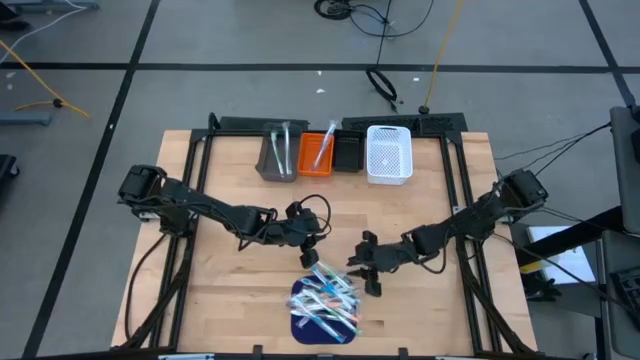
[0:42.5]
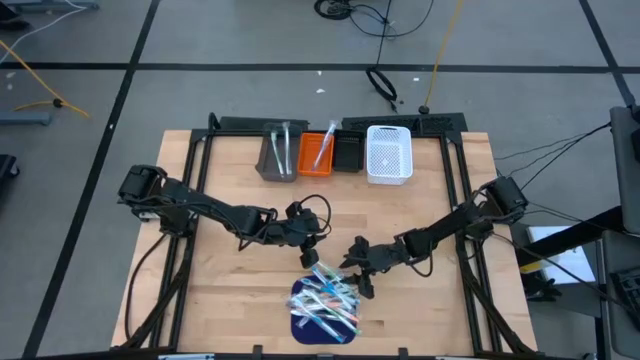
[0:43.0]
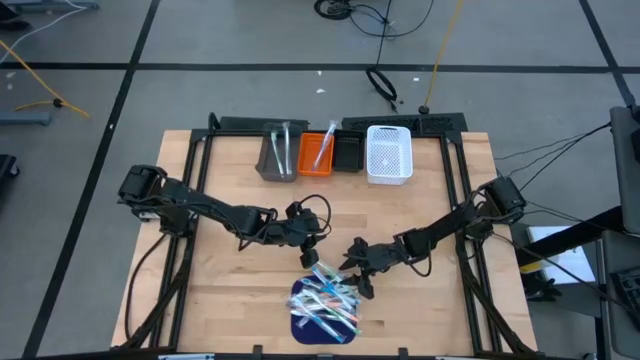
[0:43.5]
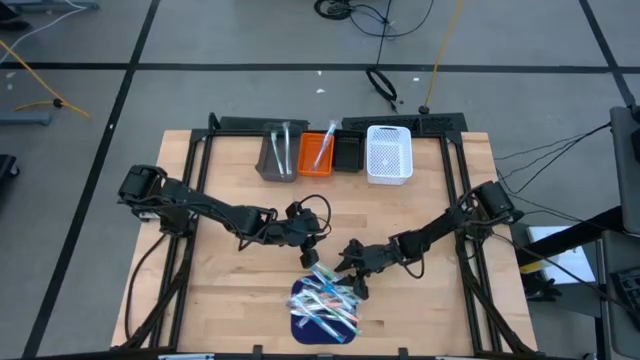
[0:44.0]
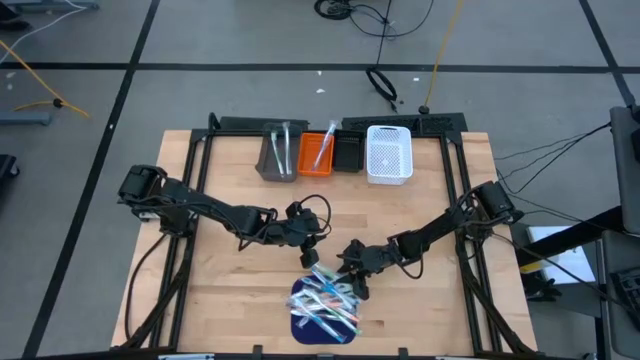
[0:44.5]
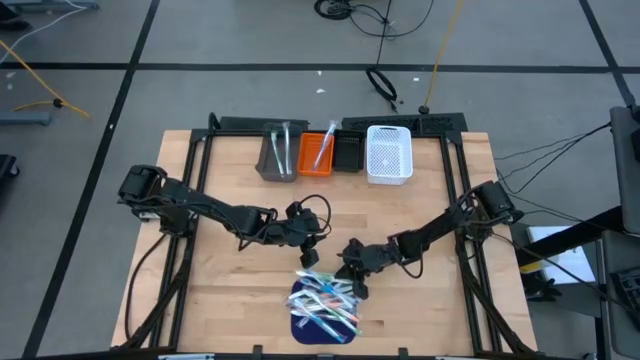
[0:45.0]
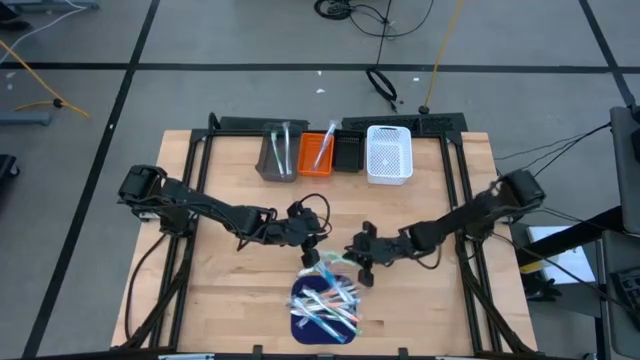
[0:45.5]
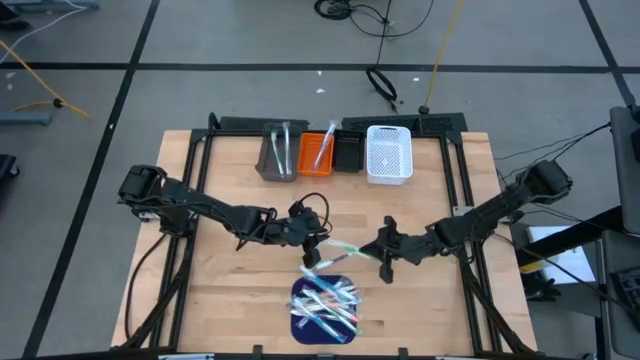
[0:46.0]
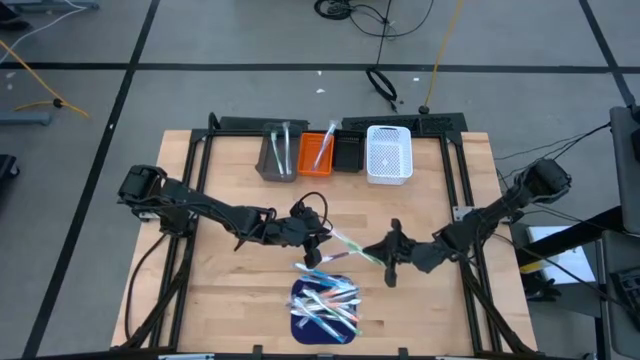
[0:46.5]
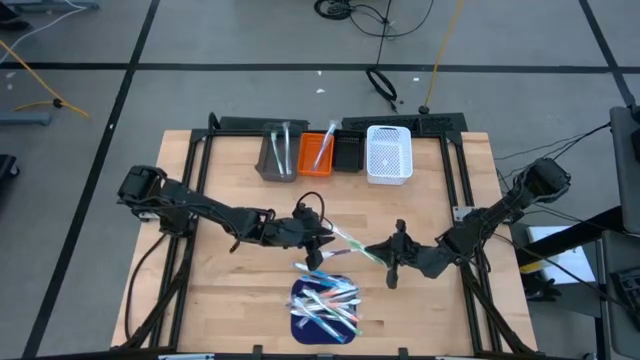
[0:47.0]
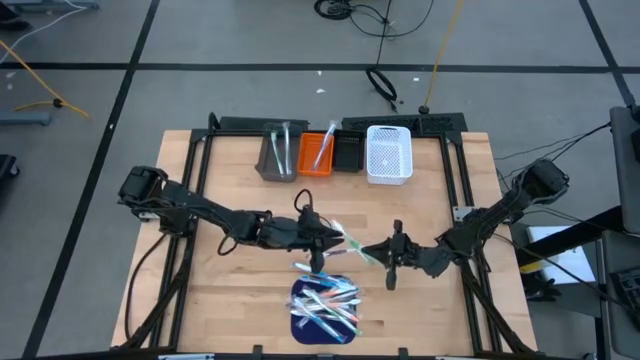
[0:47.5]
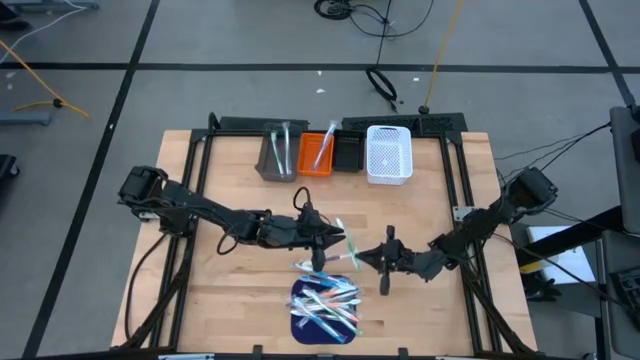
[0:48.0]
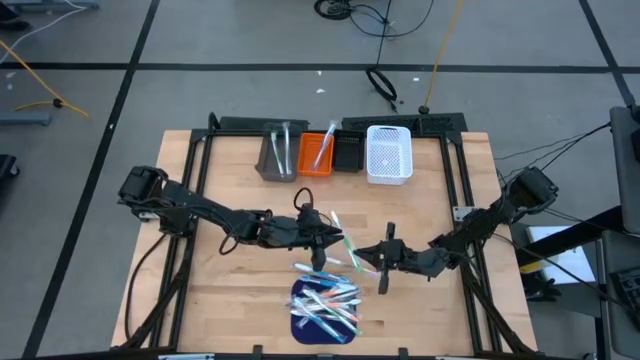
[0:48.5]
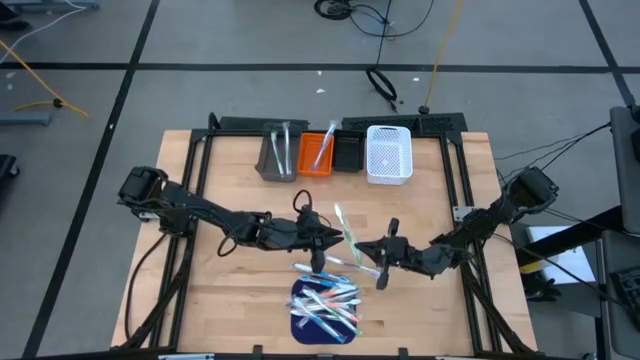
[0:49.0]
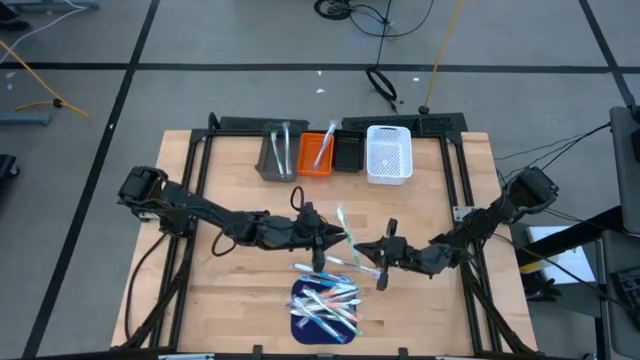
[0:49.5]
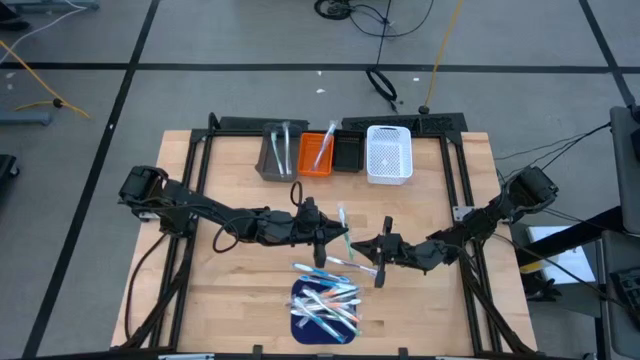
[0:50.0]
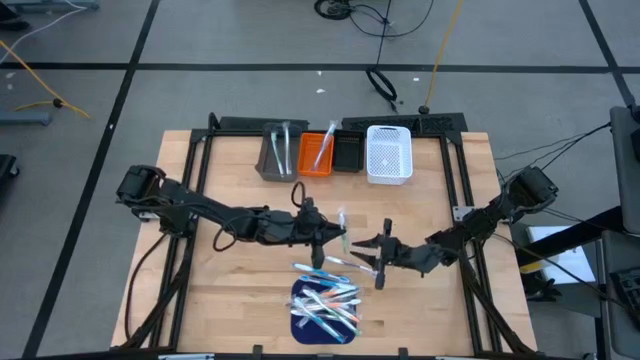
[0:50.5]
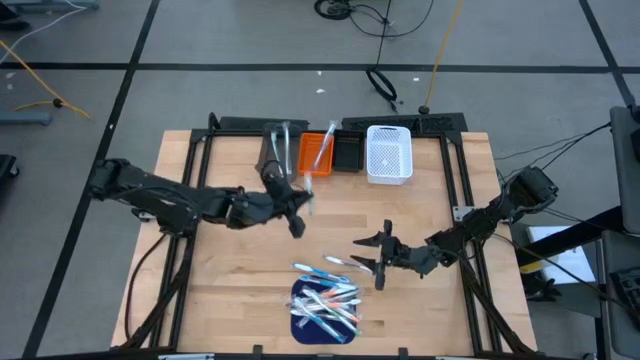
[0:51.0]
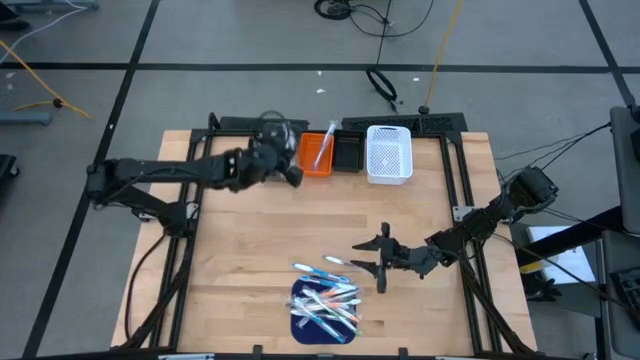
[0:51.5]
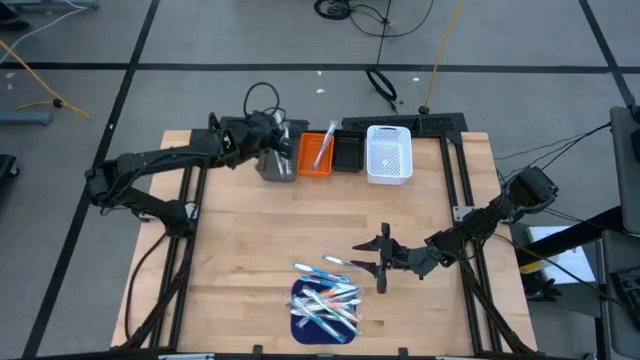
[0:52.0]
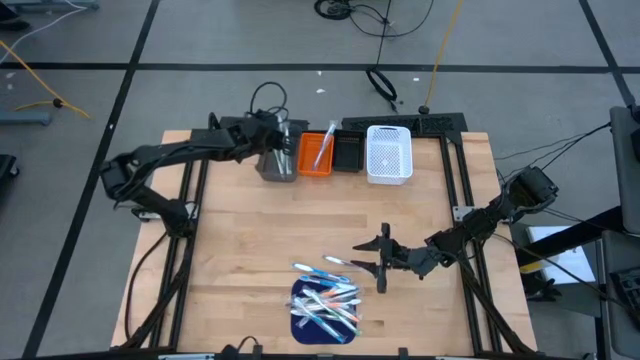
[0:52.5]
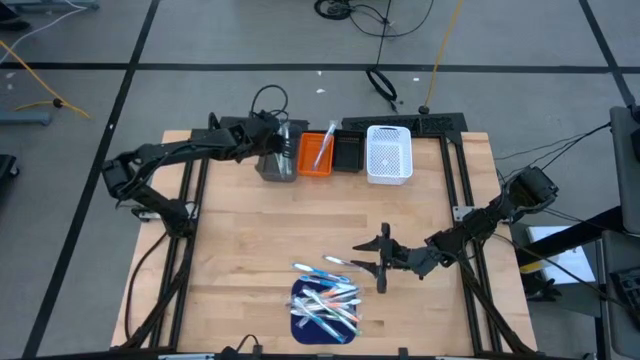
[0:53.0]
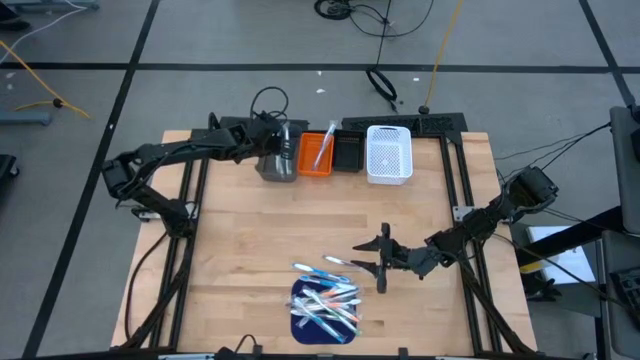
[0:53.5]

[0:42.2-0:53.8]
Task: Pick & Place Toothbrushes
Put the green toothbrush into the light black bin

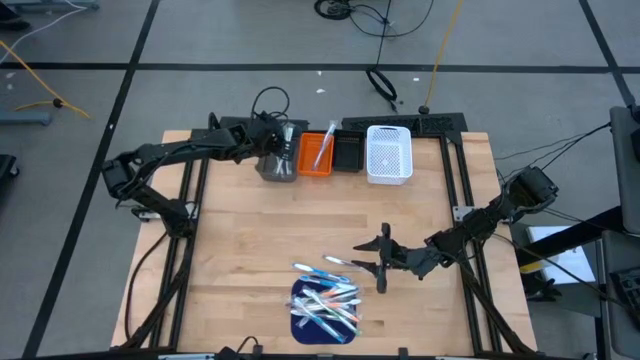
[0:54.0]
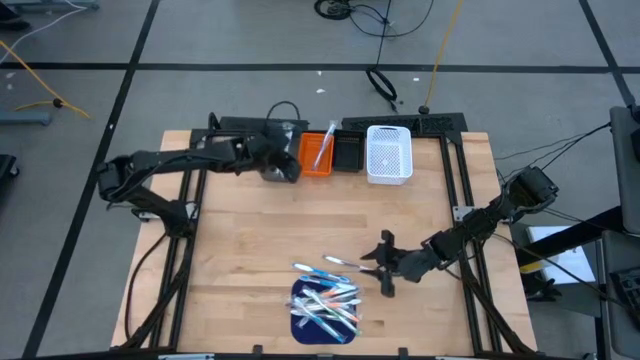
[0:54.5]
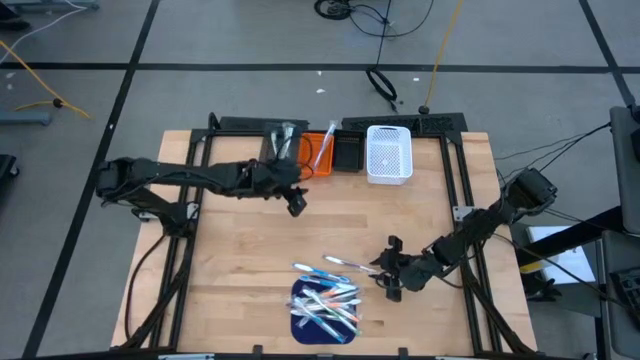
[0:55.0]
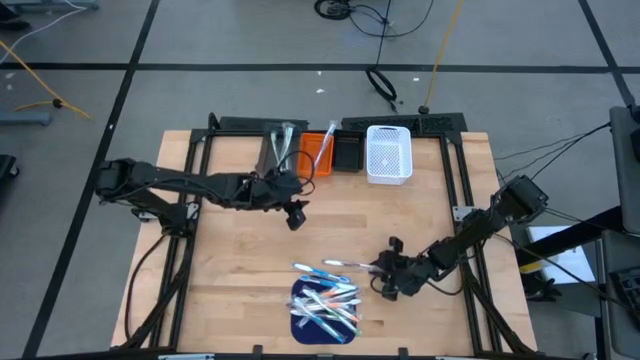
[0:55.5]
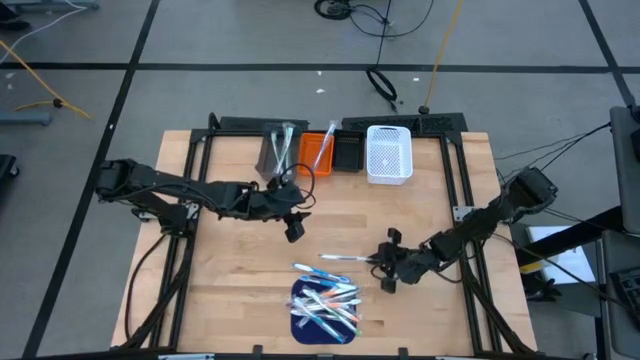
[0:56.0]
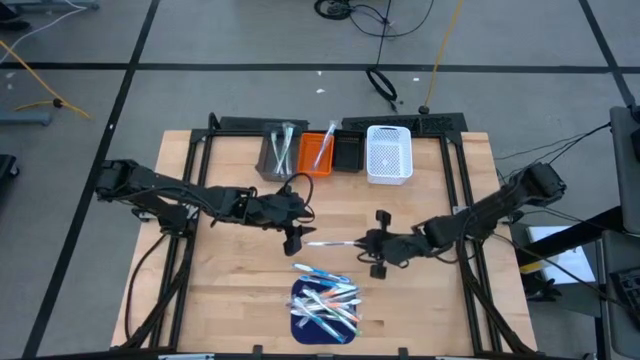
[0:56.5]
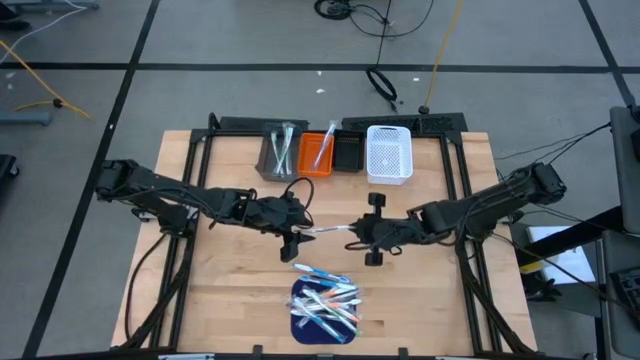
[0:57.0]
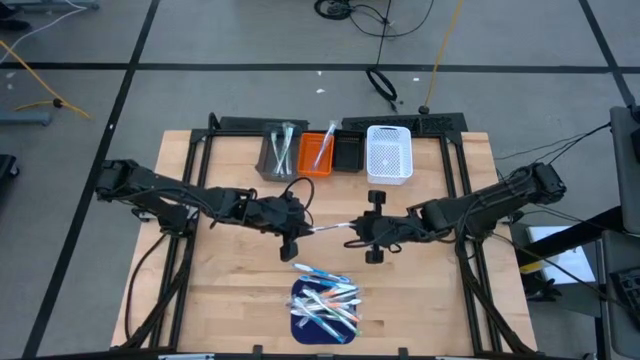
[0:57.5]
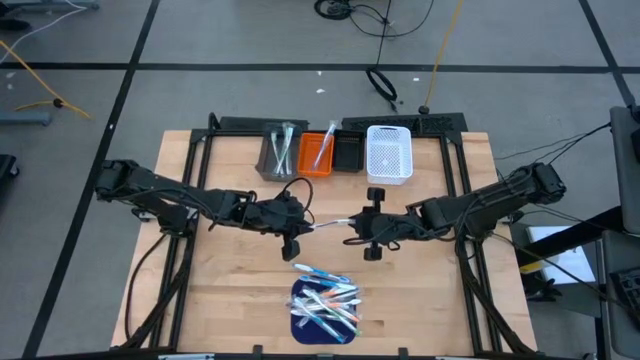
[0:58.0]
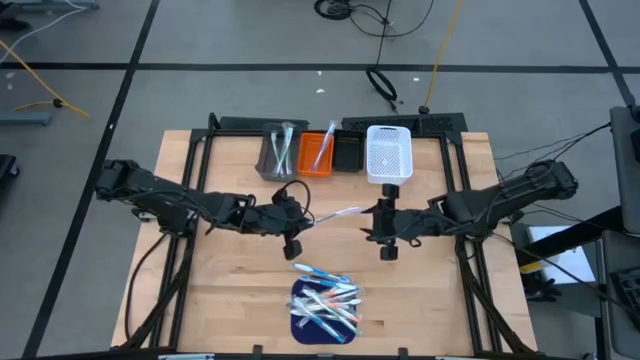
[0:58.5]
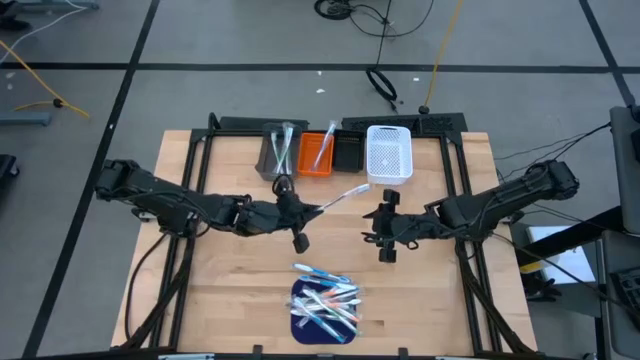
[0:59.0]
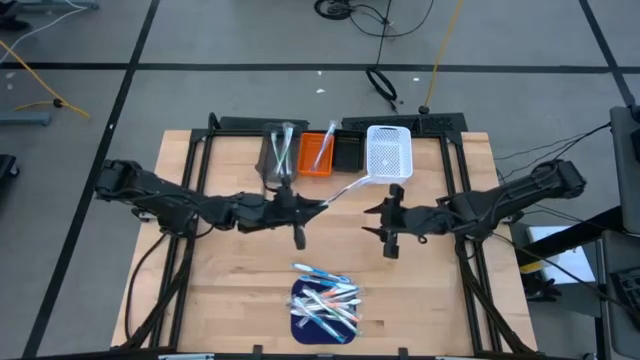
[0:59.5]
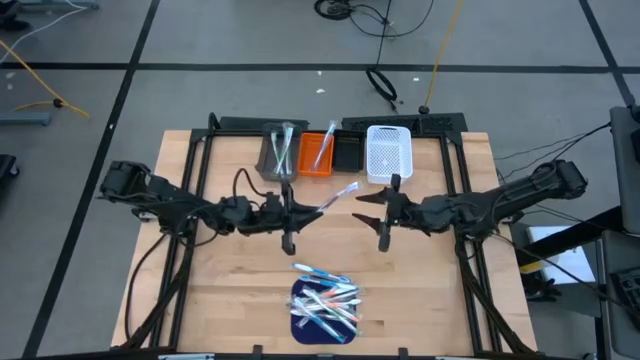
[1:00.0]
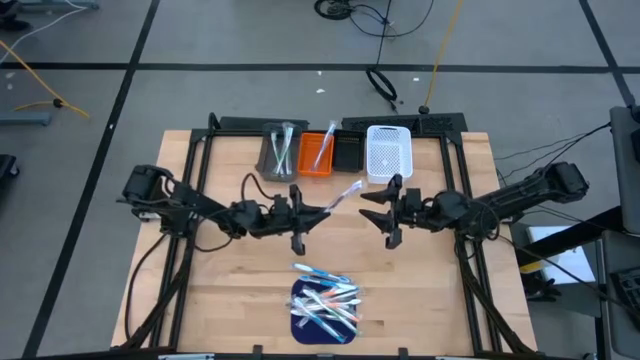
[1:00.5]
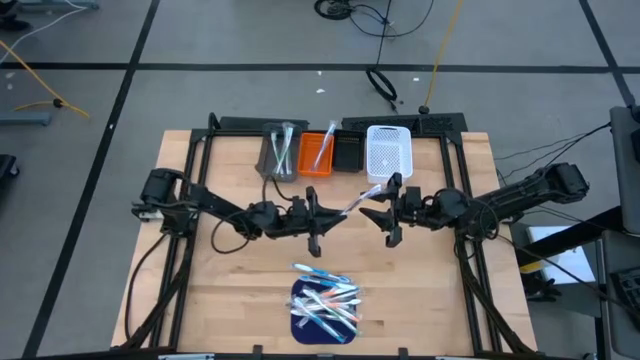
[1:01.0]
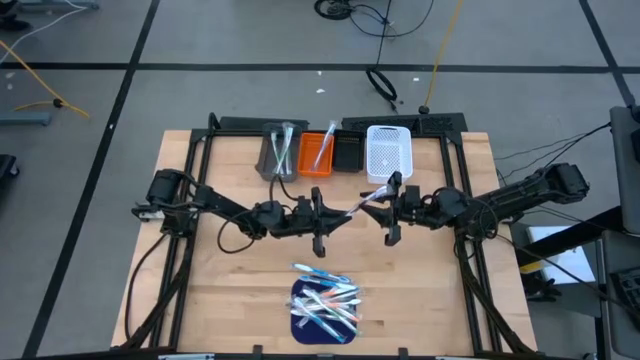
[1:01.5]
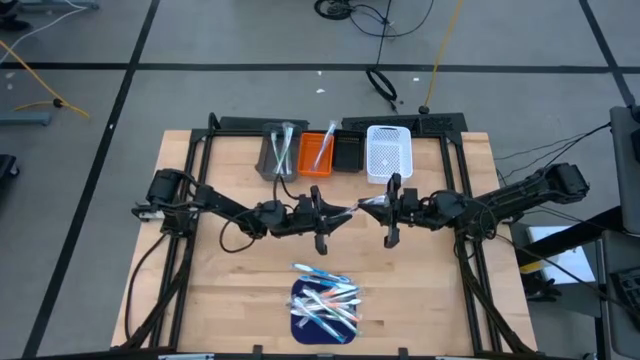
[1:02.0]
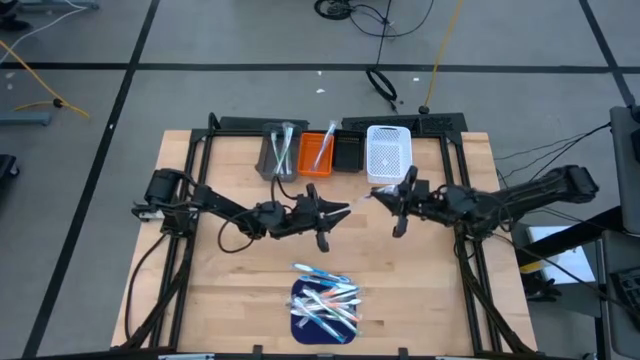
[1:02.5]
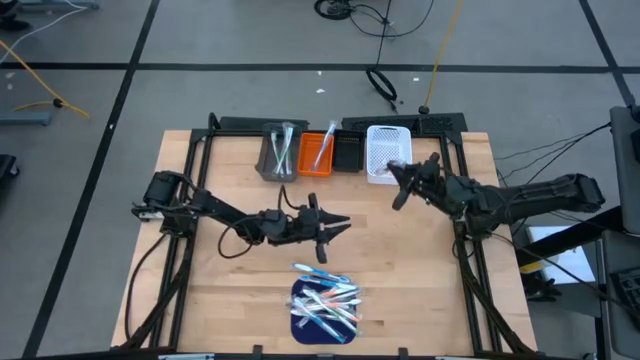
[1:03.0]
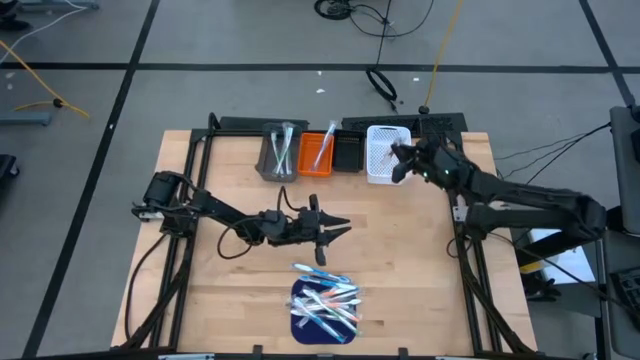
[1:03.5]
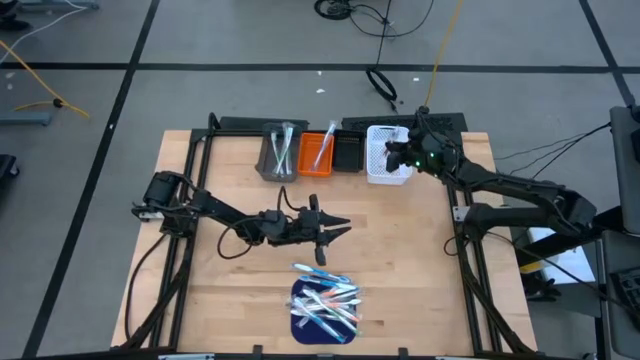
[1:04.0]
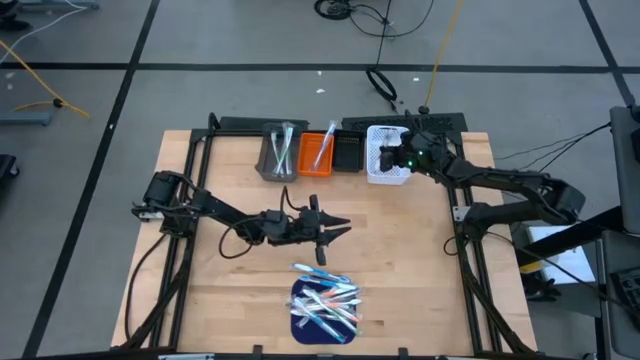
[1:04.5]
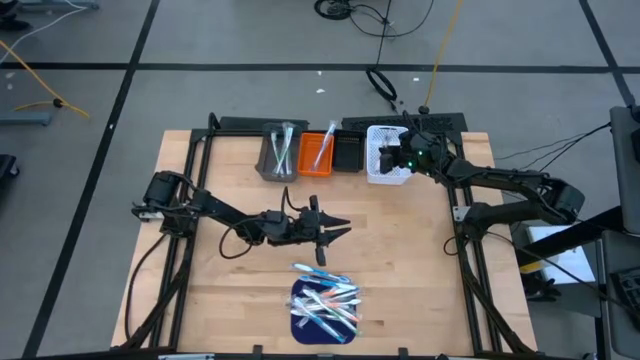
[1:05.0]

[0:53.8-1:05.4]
Put the purple toothbrush into the white bin
